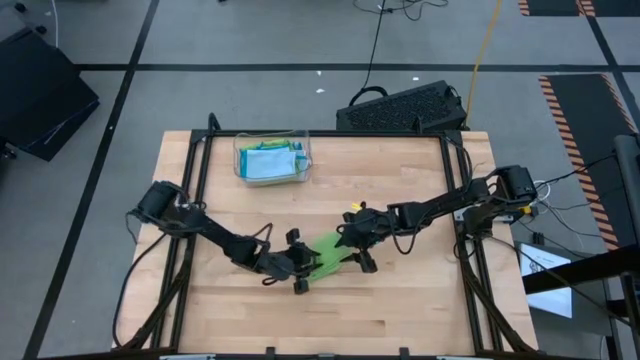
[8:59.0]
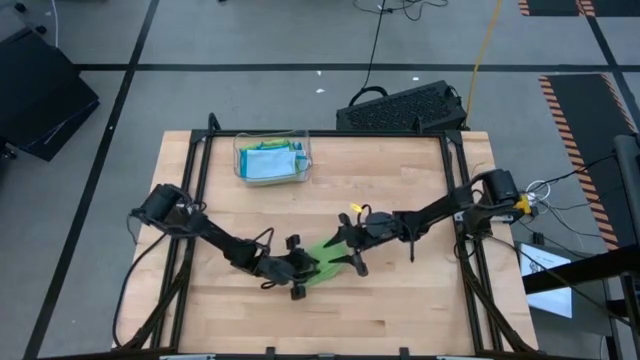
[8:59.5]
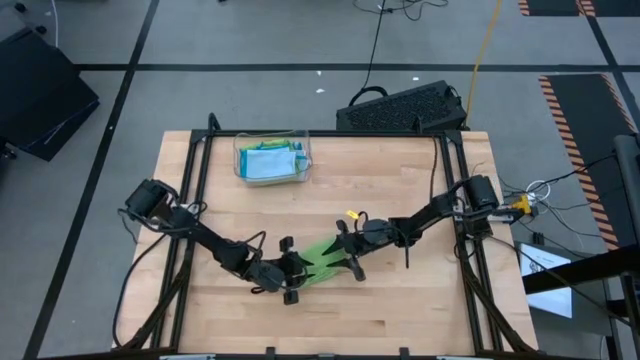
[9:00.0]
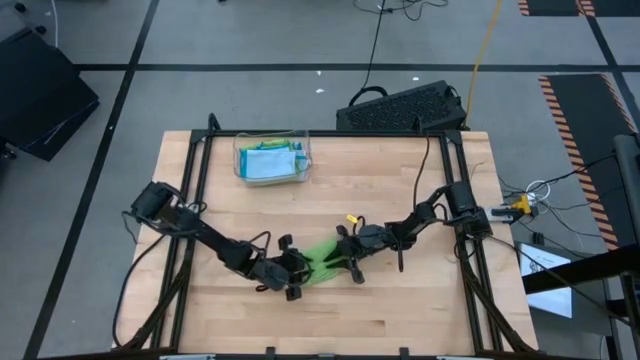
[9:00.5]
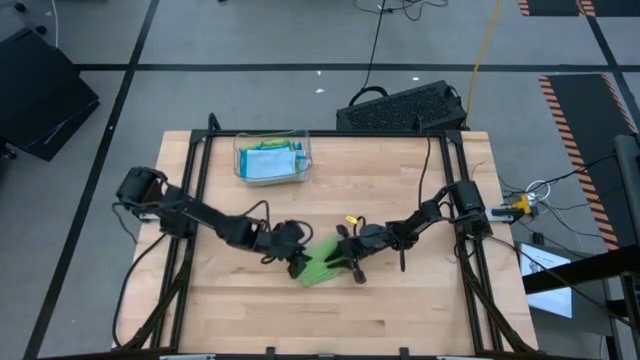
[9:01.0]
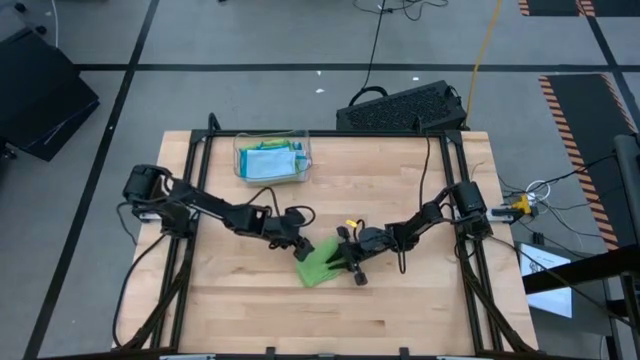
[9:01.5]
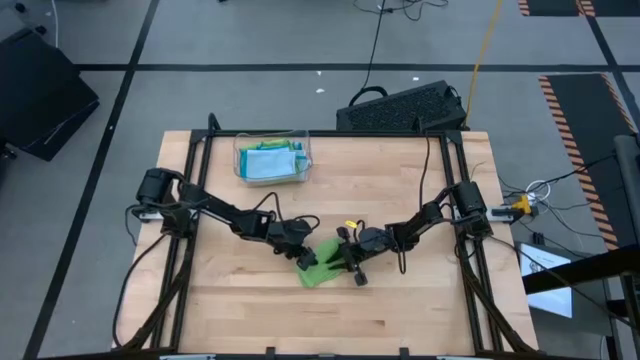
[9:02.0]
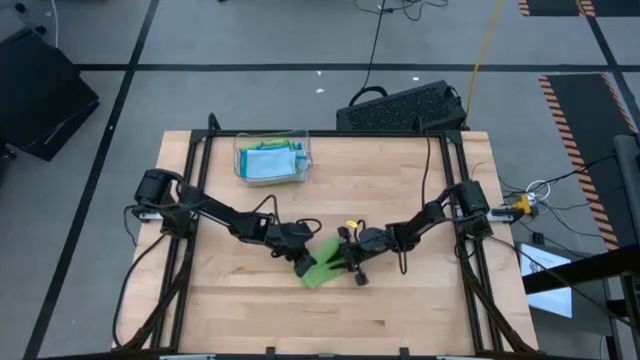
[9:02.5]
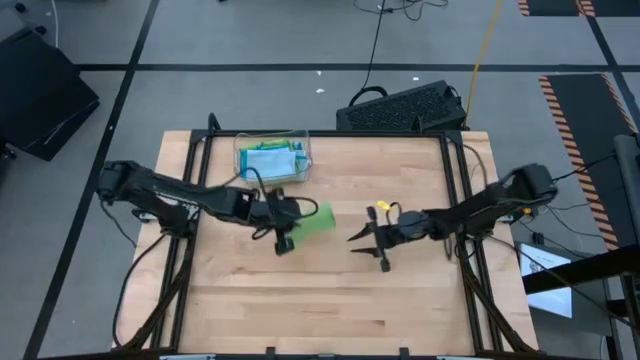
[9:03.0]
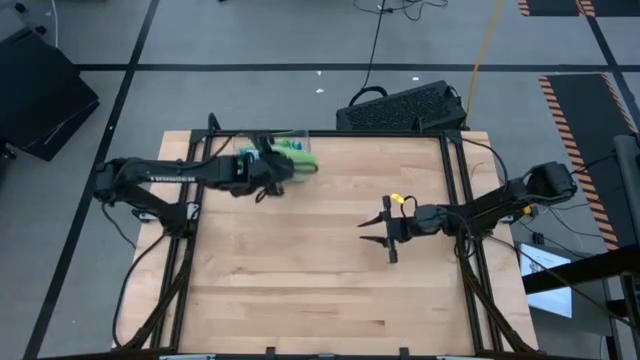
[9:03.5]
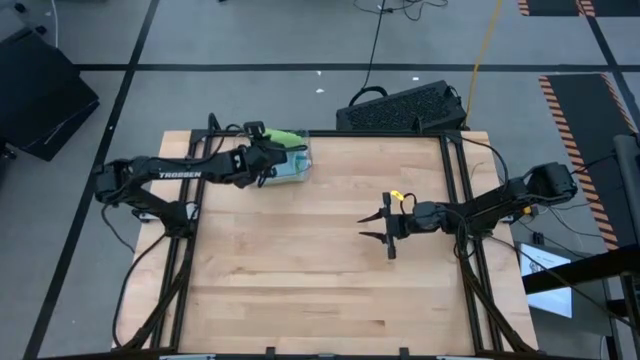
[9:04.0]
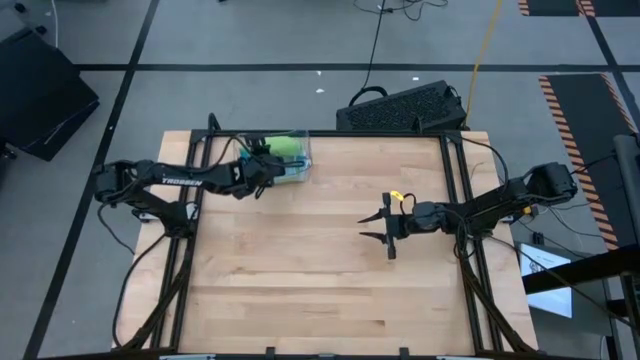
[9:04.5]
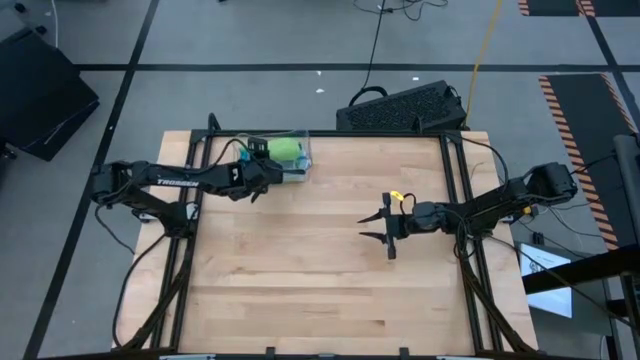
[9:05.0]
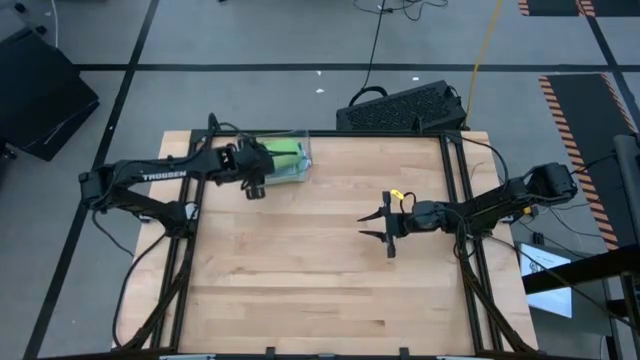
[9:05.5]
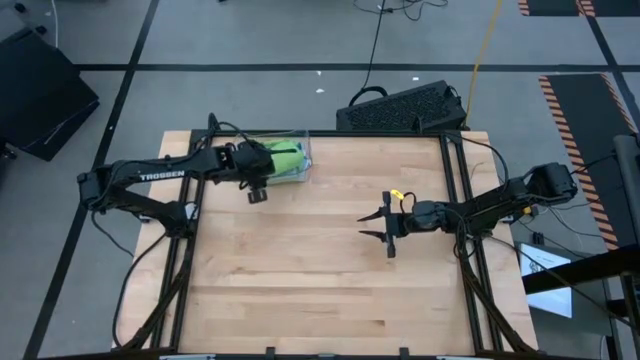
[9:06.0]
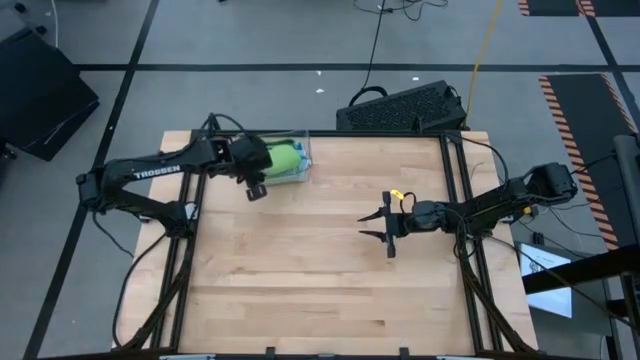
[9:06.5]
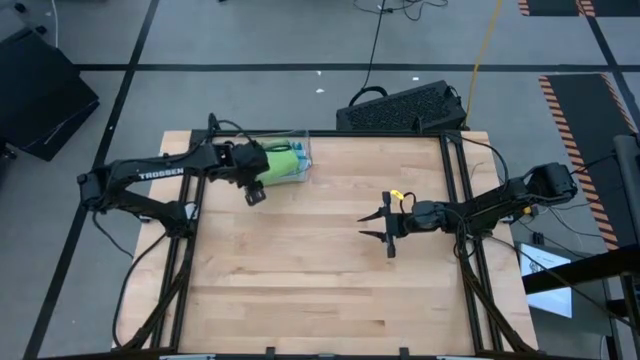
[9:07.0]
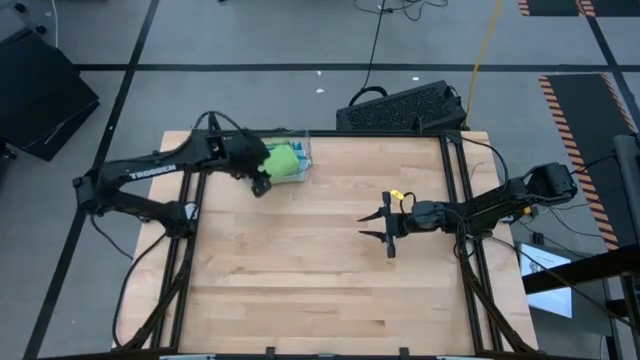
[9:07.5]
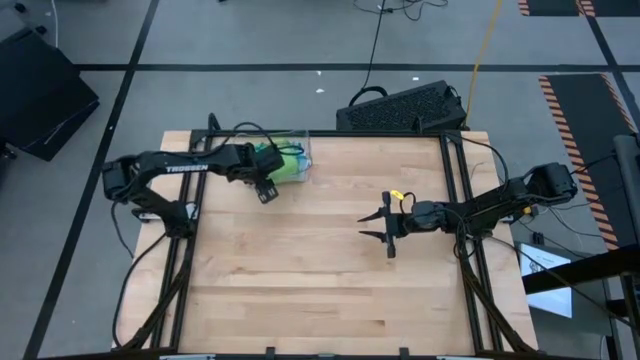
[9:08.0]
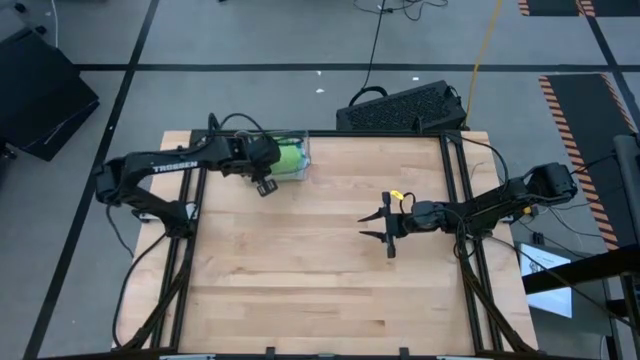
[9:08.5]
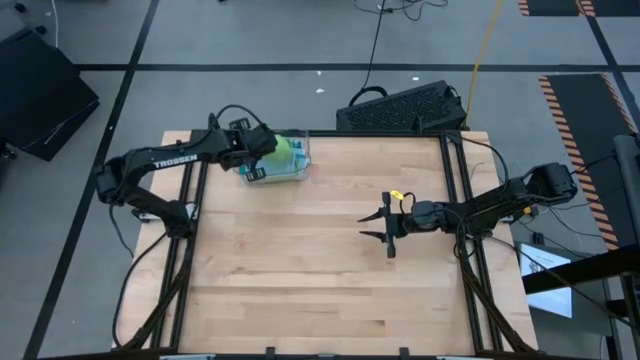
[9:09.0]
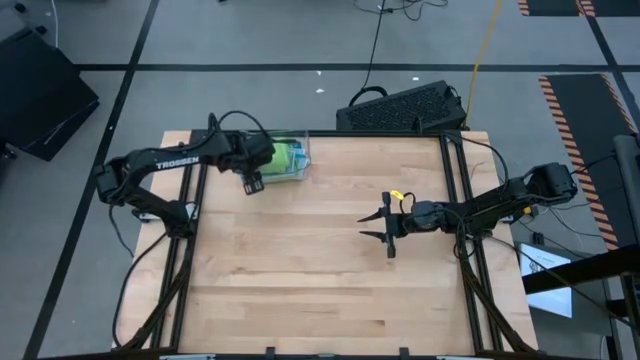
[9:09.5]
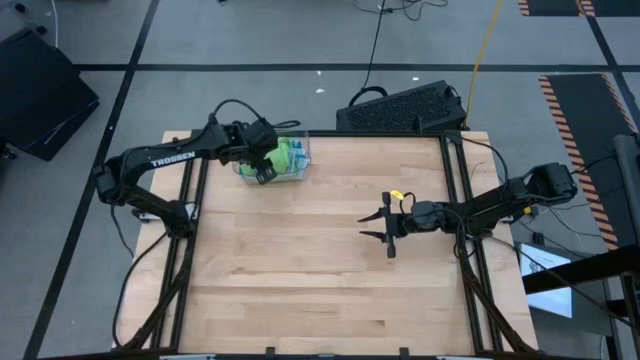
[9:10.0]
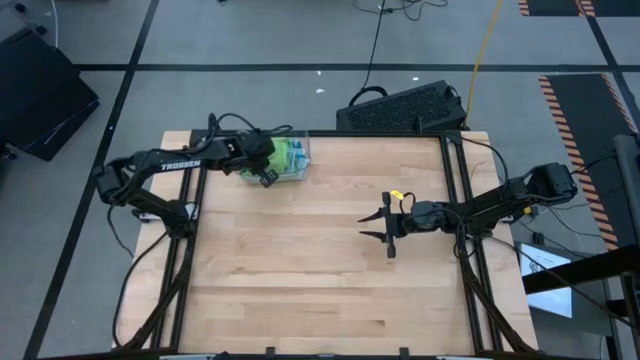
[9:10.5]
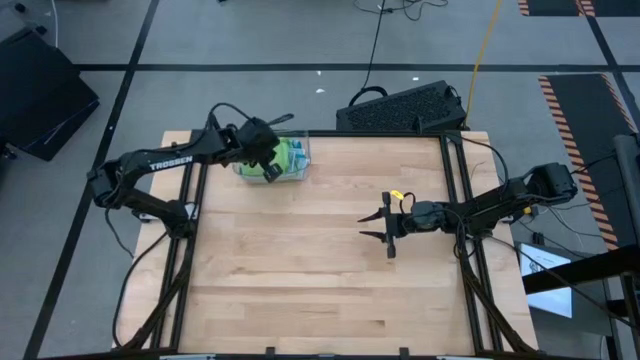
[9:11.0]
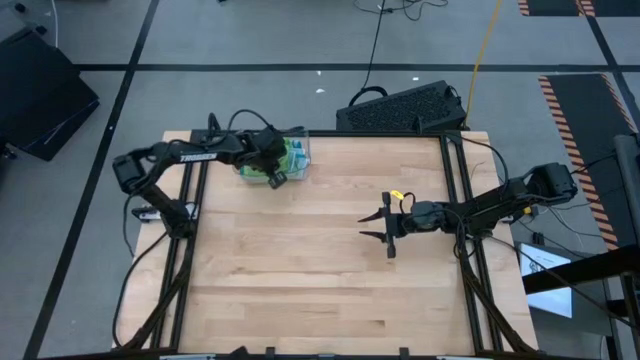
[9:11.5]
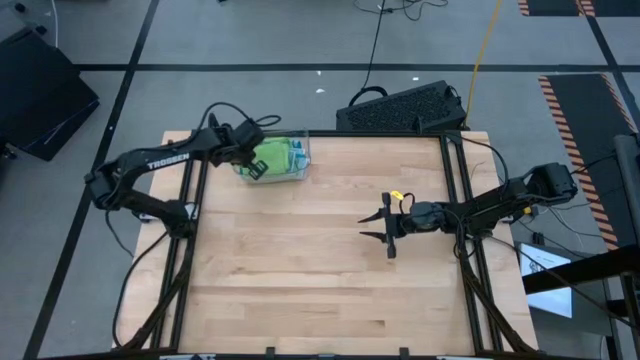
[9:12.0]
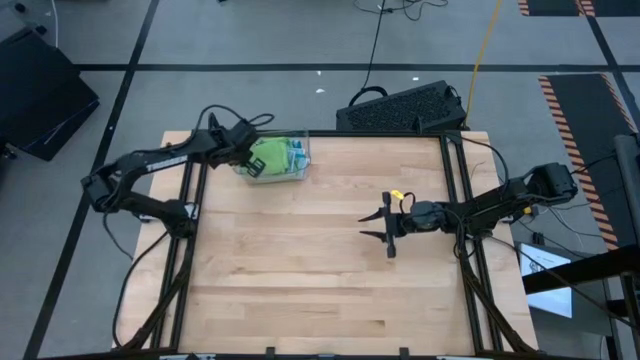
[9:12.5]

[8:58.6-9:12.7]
Task: Fold microfiber towels
Put the green microfiber cloth into the bin

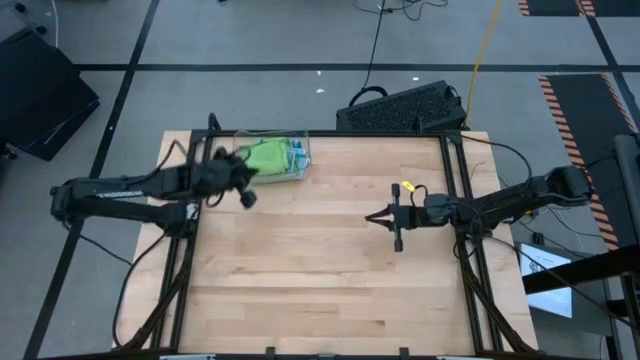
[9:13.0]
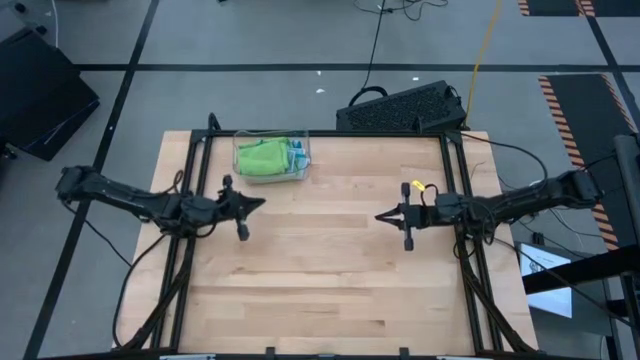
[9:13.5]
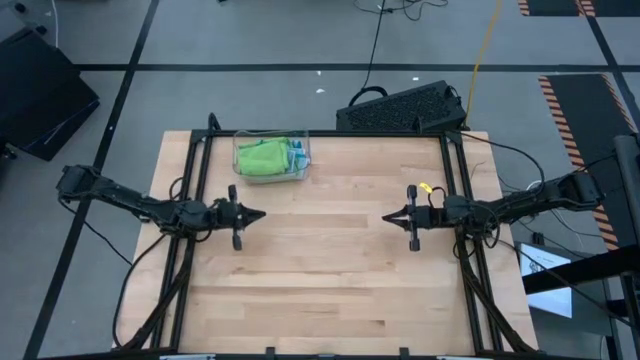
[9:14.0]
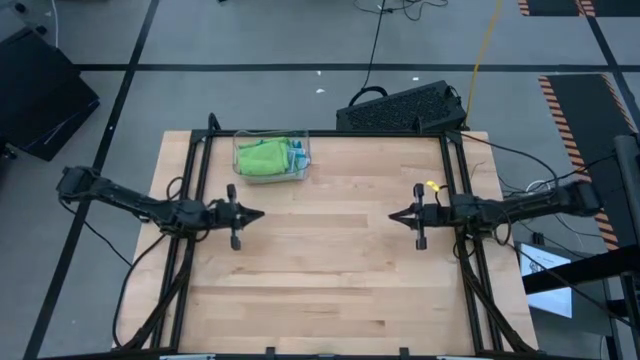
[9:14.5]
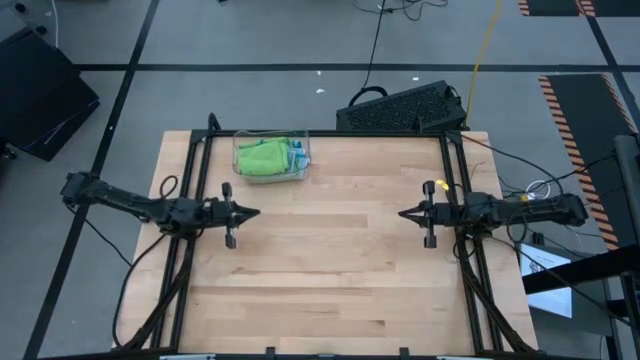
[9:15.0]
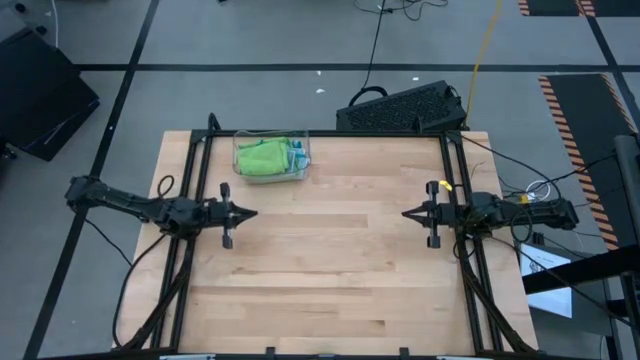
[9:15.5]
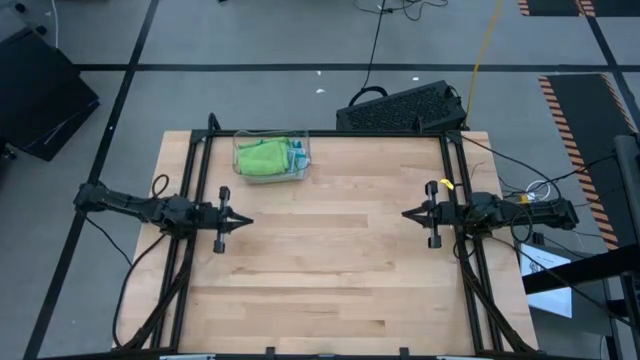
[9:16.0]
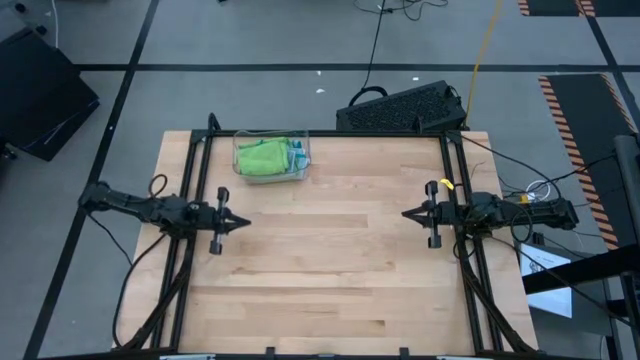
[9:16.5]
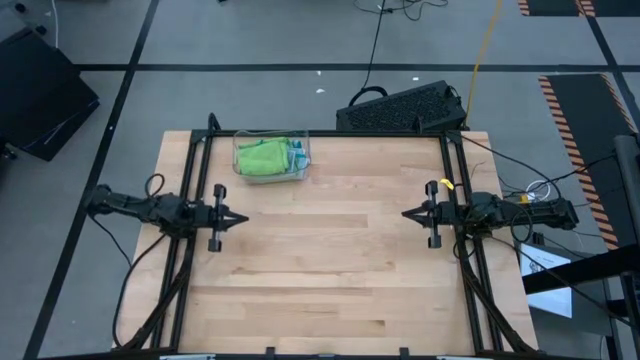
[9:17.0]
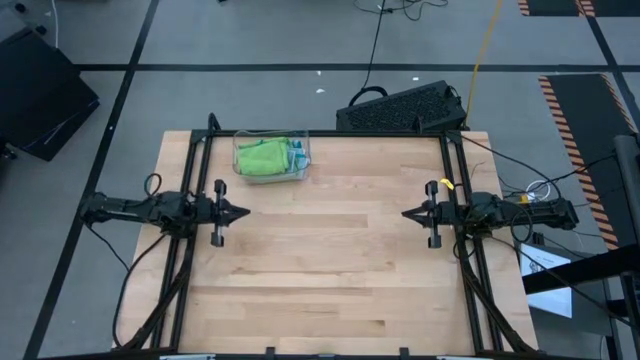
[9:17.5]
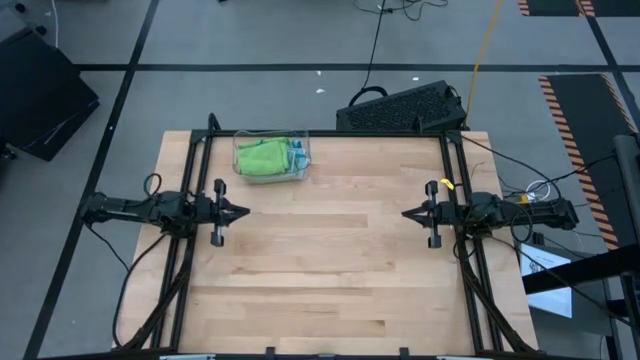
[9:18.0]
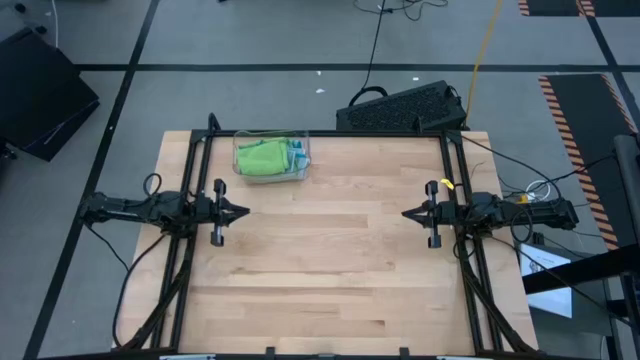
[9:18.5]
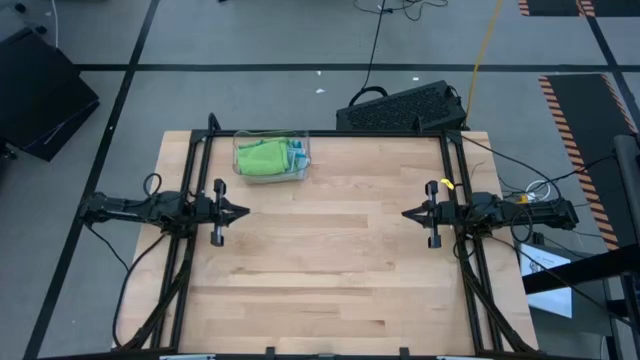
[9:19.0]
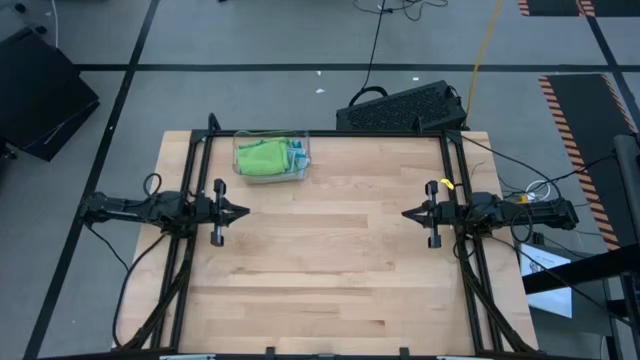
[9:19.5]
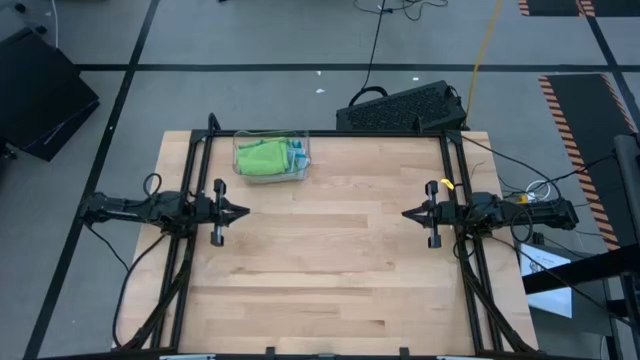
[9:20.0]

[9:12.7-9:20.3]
Return to Home Position
